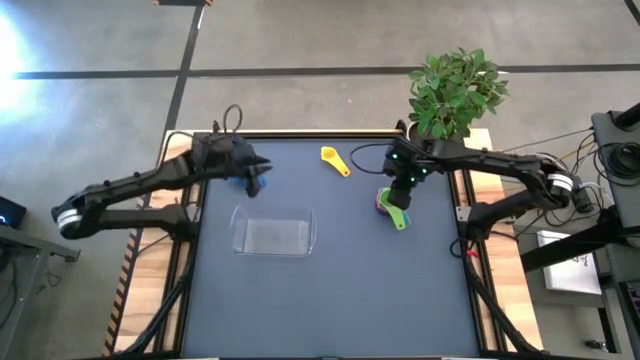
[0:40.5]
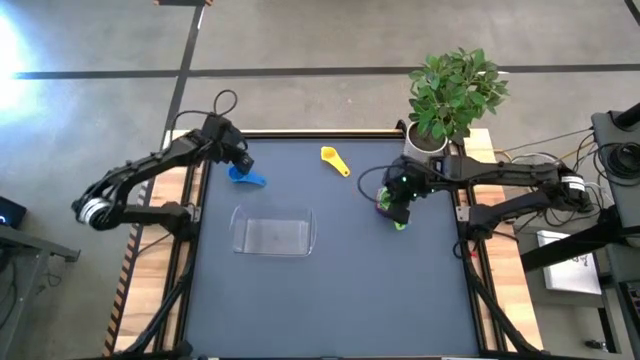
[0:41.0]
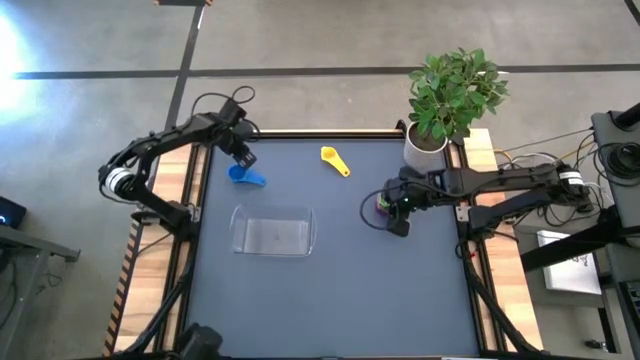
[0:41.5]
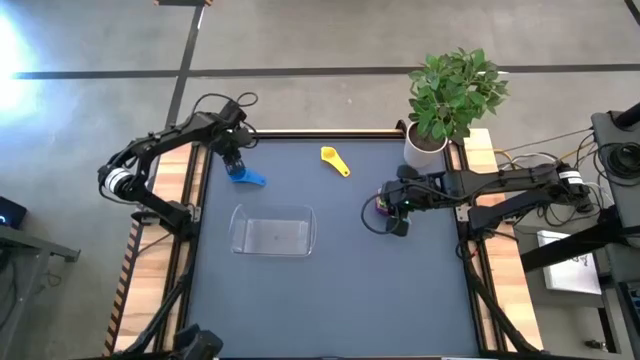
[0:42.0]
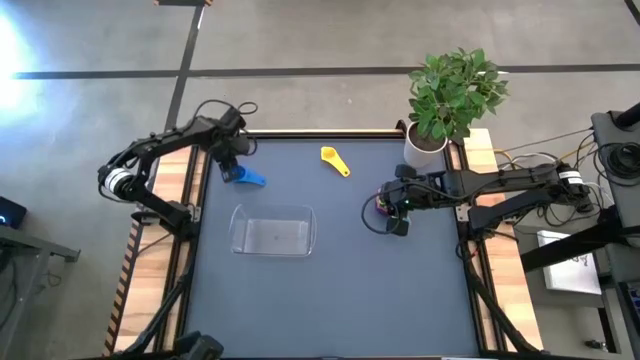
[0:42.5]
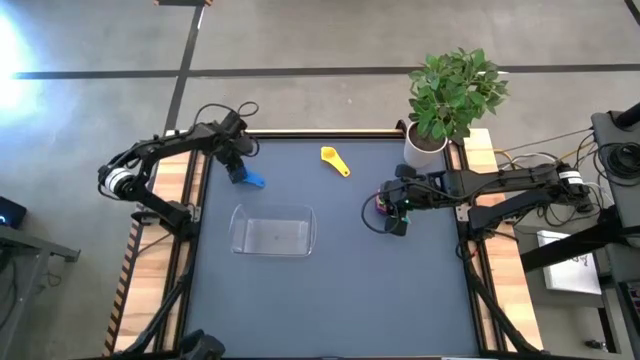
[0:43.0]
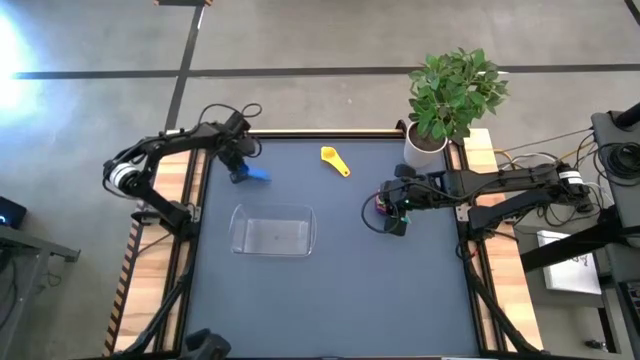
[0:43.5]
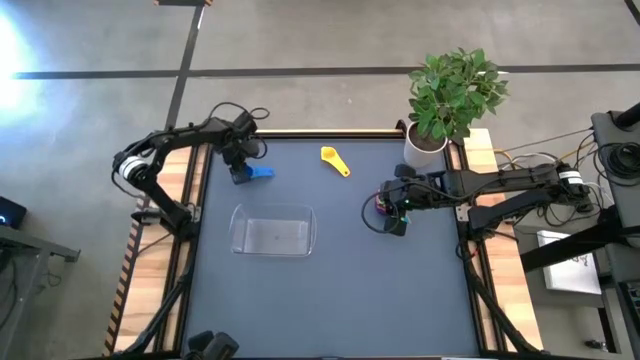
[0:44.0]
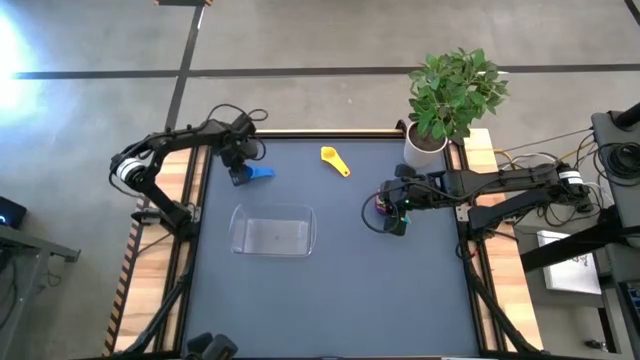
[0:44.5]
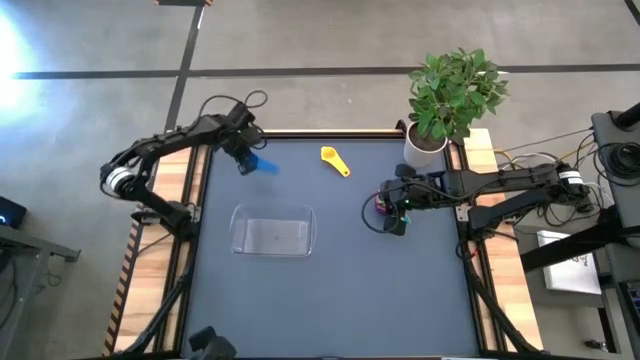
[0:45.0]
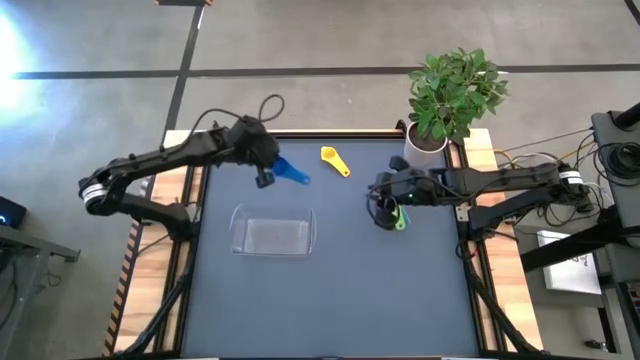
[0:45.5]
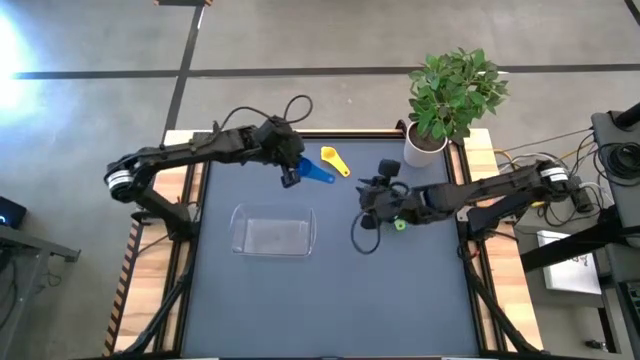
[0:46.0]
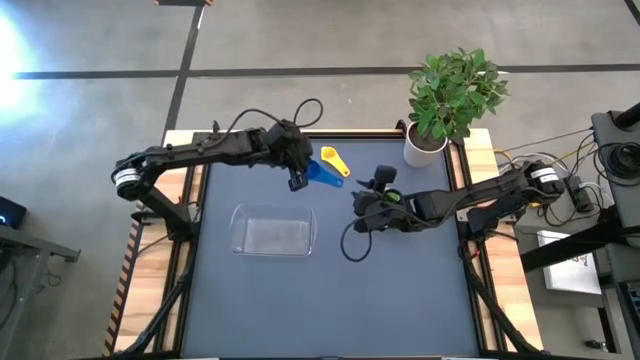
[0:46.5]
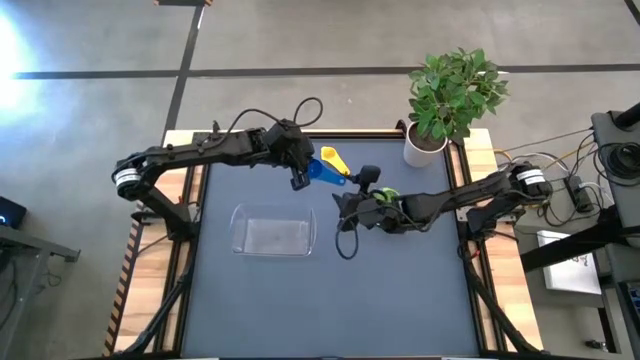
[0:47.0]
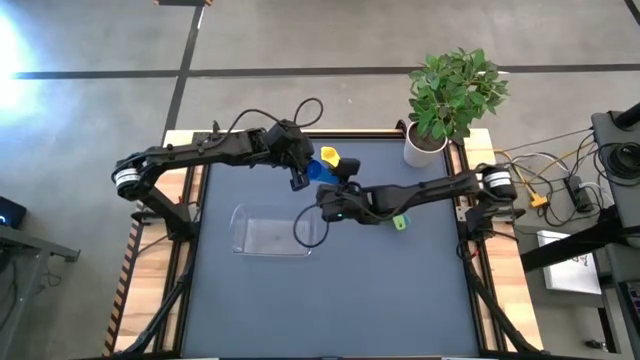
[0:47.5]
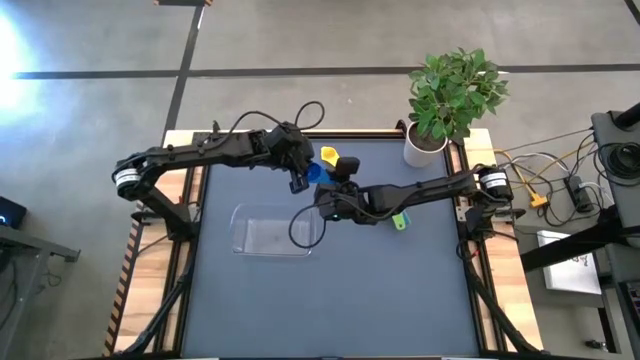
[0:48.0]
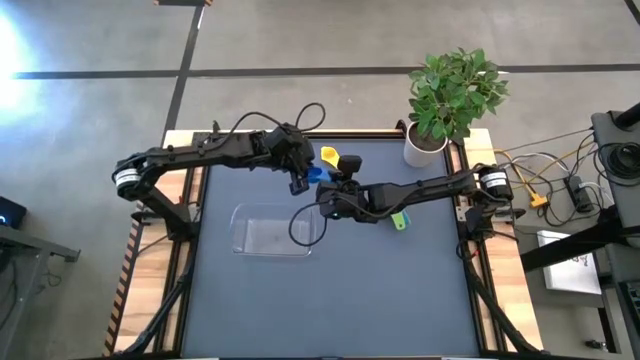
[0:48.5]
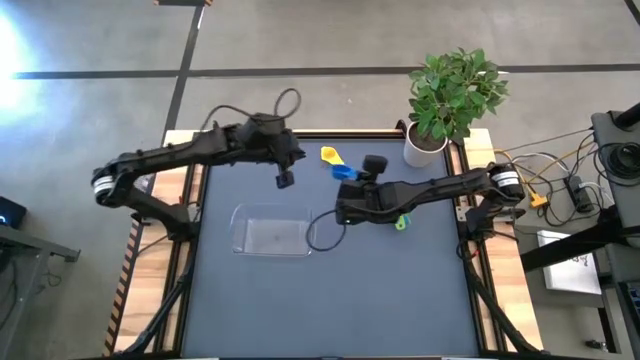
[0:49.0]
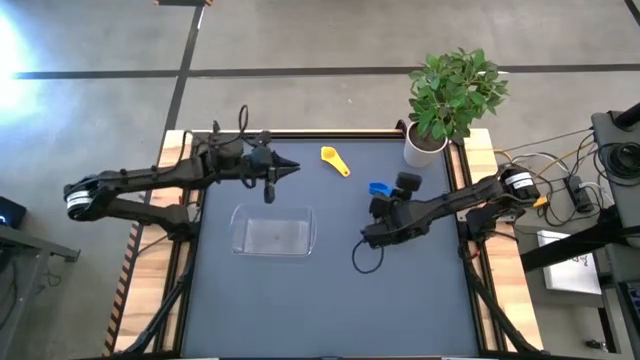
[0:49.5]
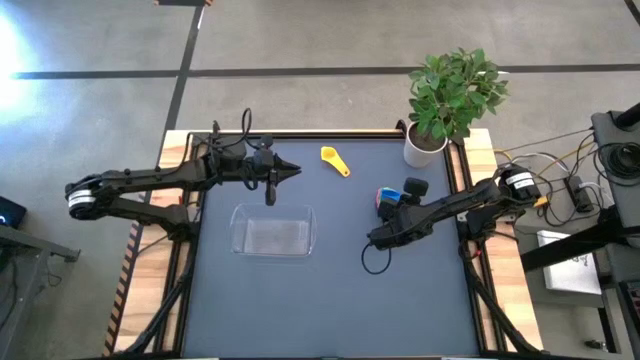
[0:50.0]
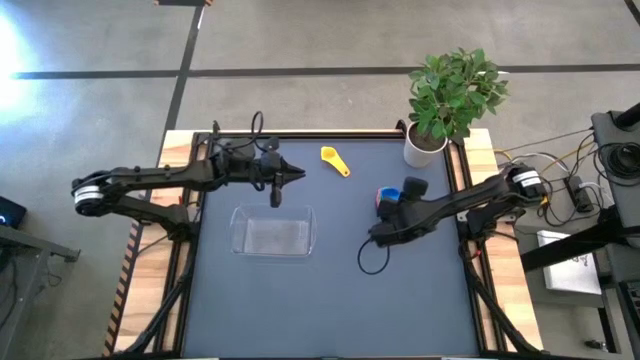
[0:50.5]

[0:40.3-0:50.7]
Task: Nest measuring cups in basket
Stack the blue measuring cup on the top of the green measuring cup

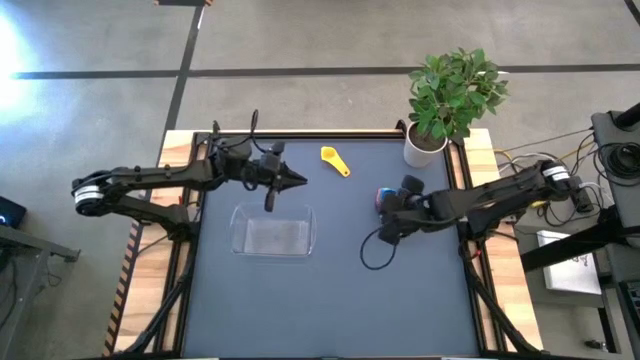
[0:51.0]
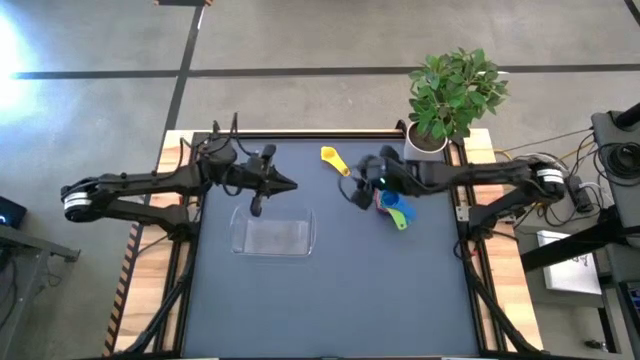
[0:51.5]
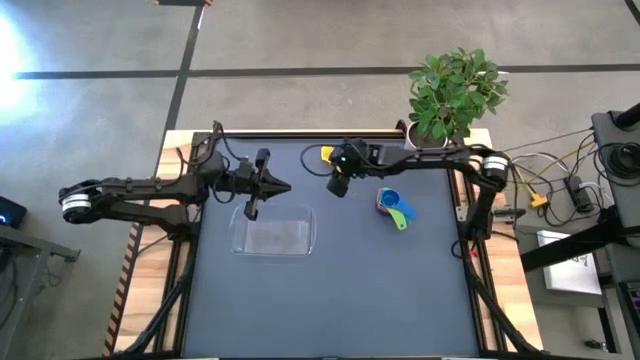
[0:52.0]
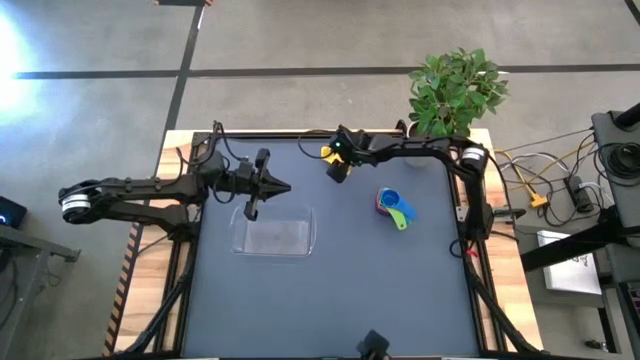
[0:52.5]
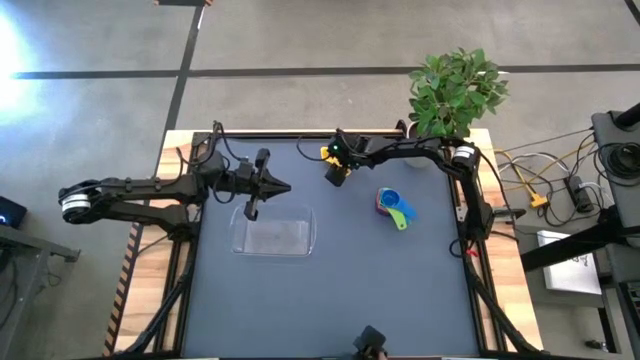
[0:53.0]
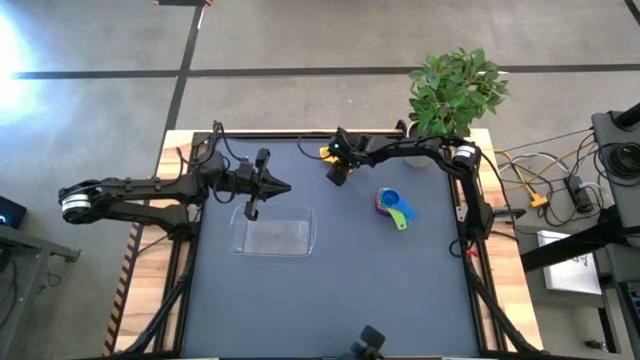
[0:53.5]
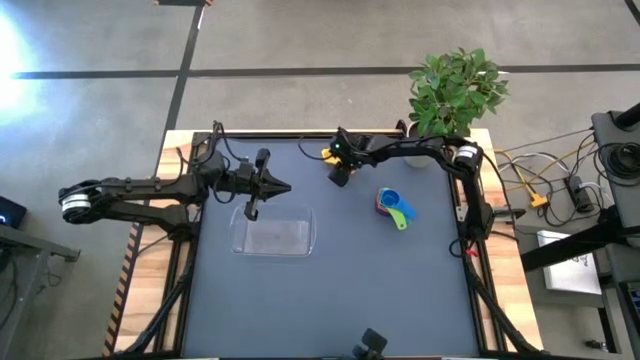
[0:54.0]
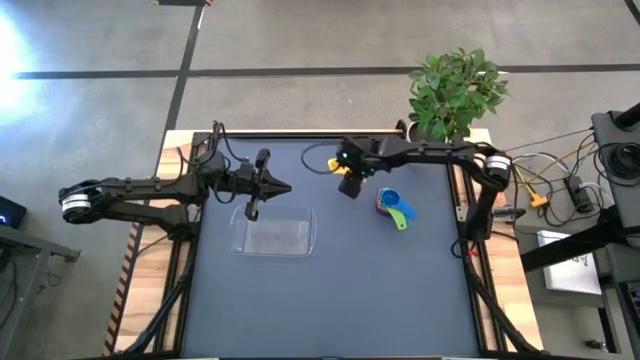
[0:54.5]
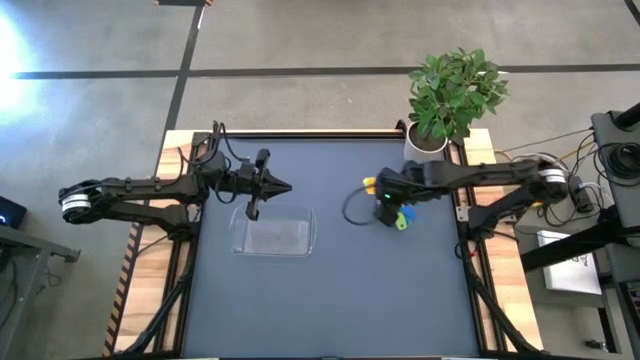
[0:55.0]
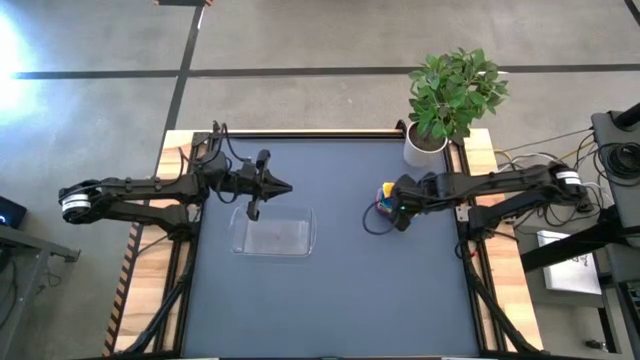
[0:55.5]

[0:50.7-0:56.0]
Stack the yellow measuring cup on the top of the blue measuring cup

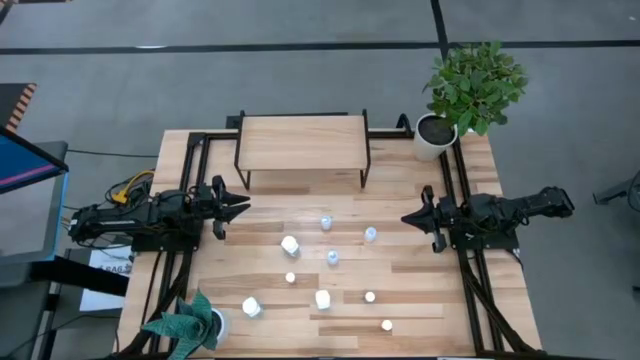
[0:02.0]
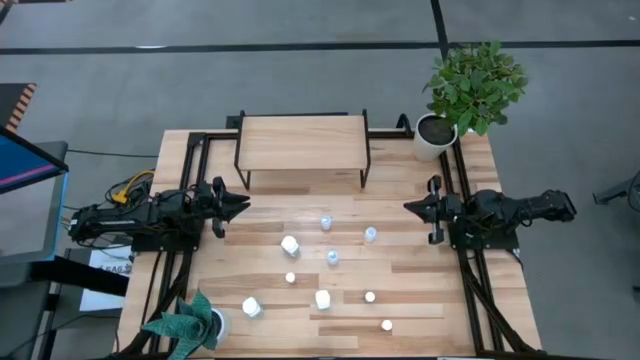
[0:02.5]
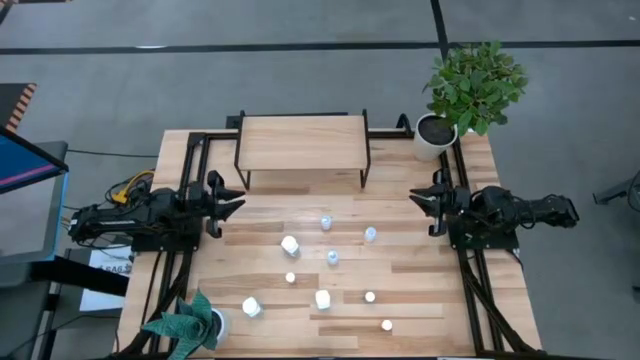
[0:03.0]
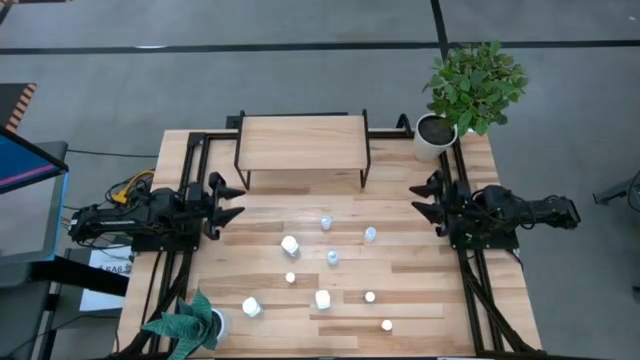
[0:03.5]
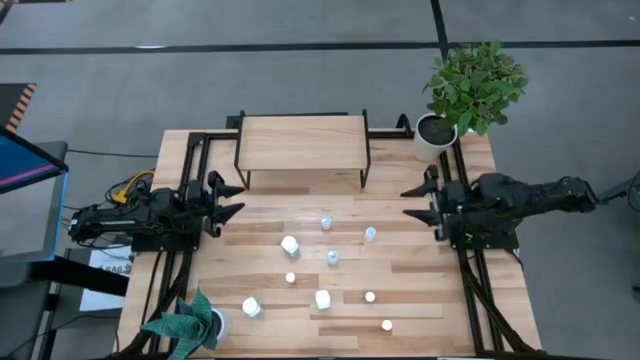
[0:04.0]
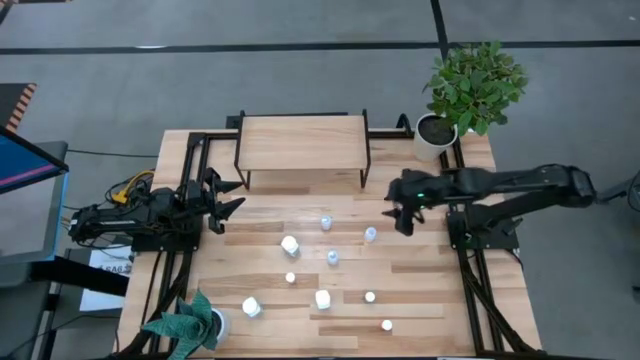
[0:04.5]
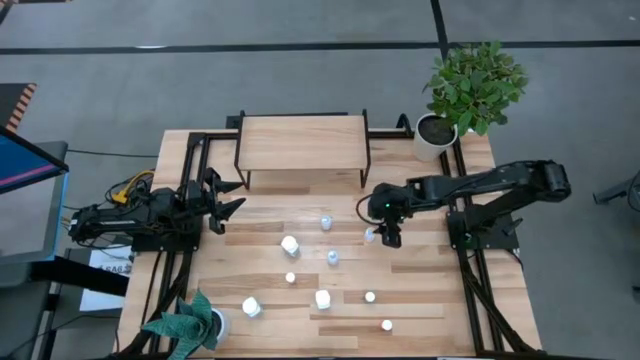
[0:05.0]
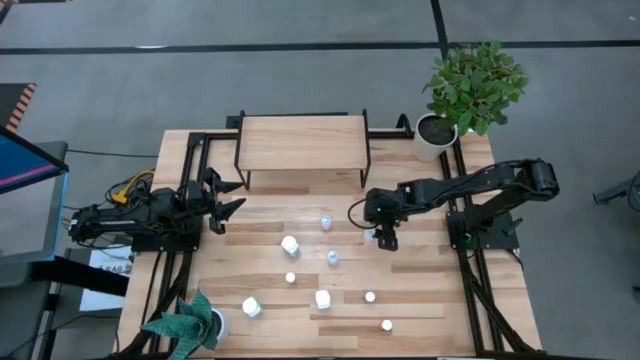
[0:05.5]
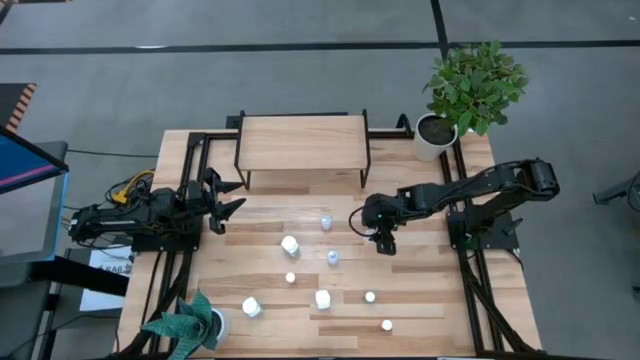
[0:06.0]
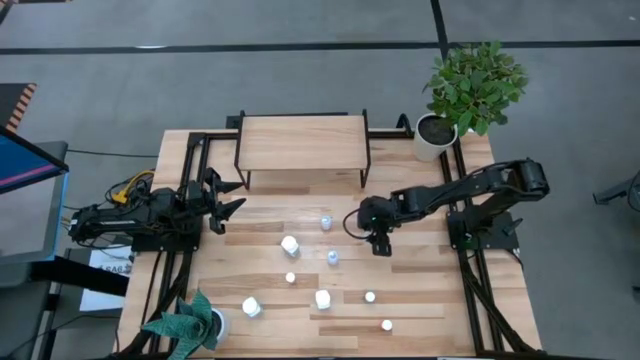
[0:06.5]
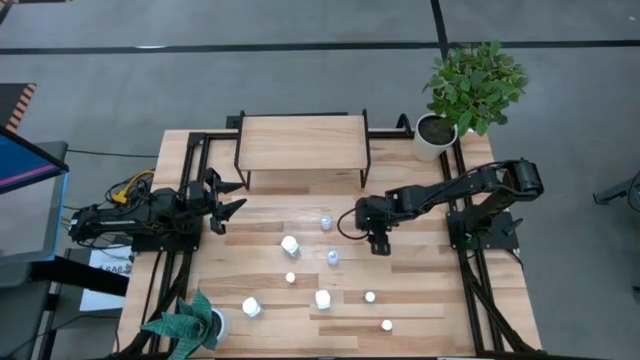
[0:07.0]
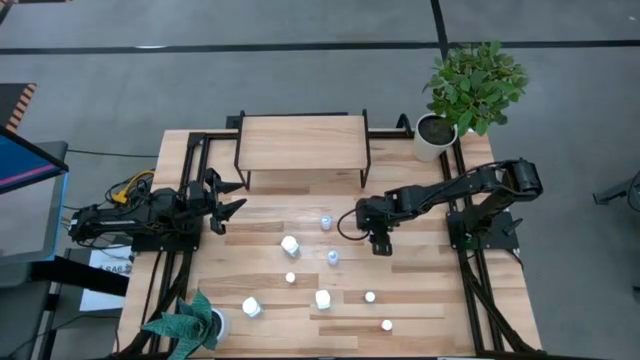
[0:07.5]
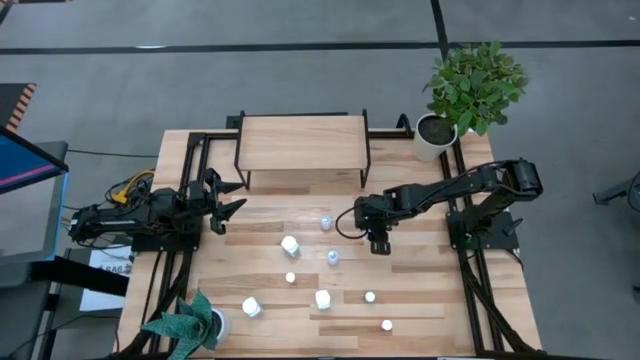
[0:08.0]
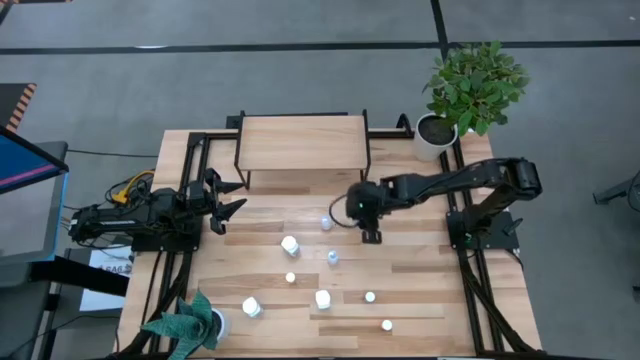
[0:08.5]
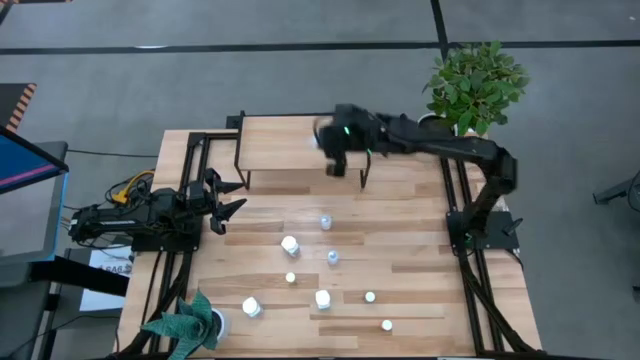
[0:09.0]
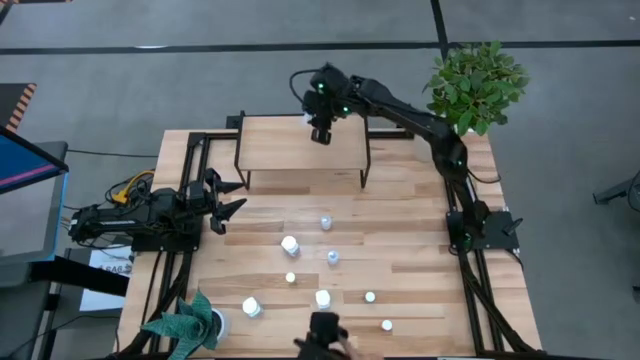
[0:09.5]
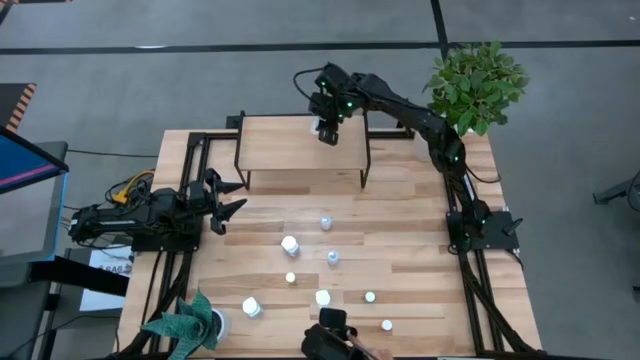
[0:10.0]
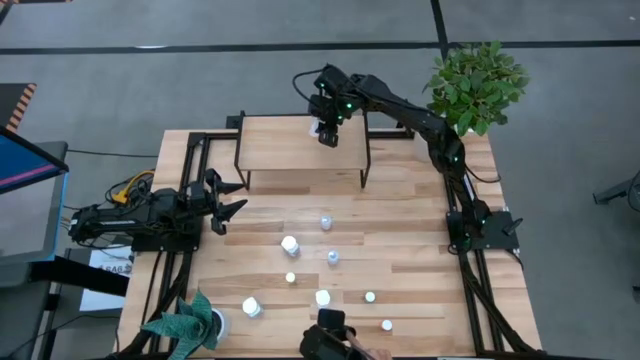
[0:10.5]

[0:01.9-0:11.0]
Task: Pick and place medicine bottles onto shelf by color
Put the top right transparent pill bottle on the shelf
